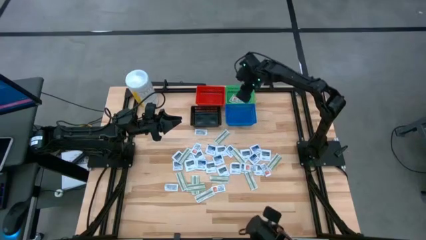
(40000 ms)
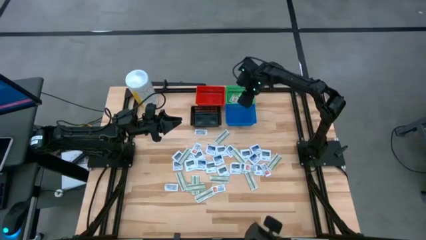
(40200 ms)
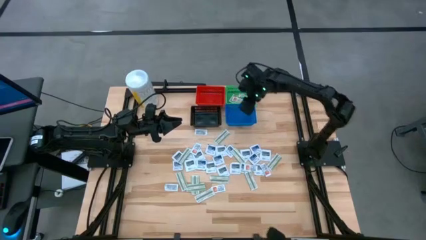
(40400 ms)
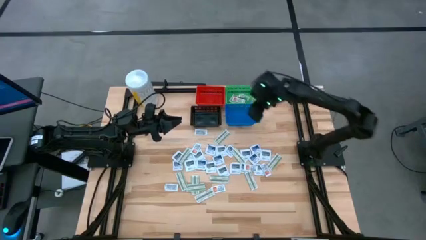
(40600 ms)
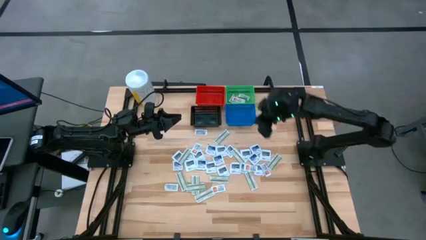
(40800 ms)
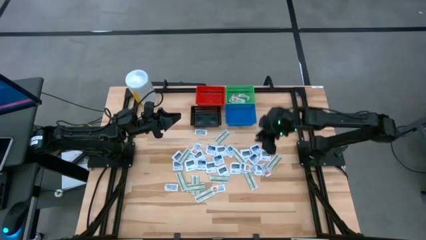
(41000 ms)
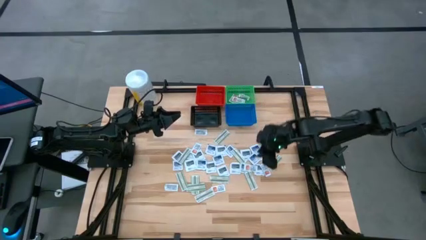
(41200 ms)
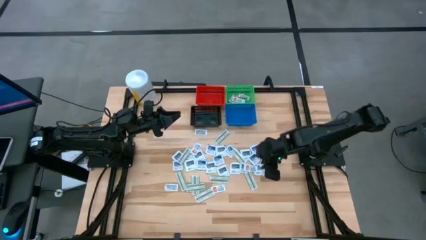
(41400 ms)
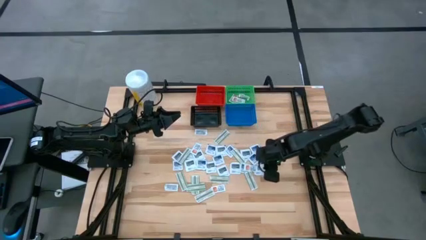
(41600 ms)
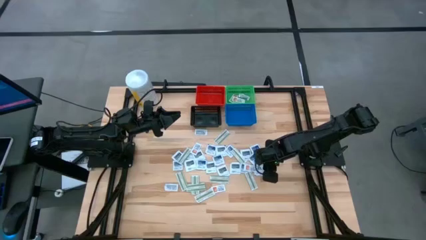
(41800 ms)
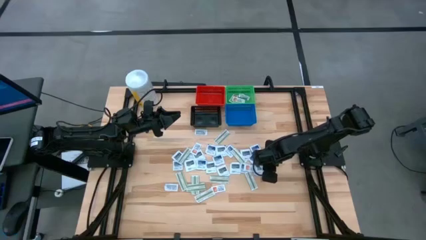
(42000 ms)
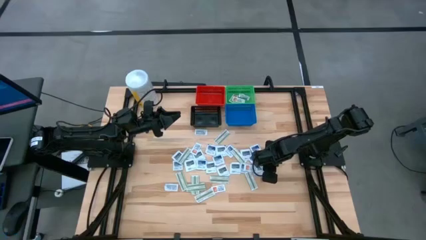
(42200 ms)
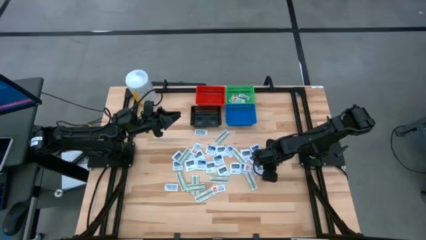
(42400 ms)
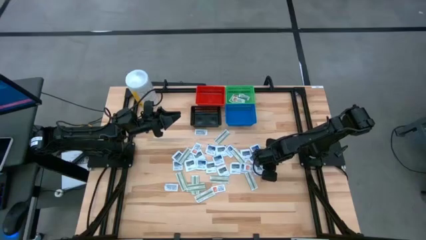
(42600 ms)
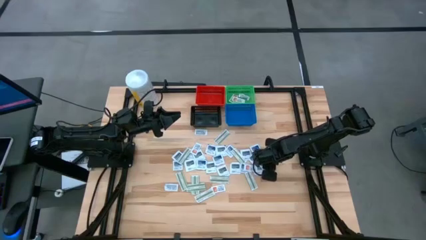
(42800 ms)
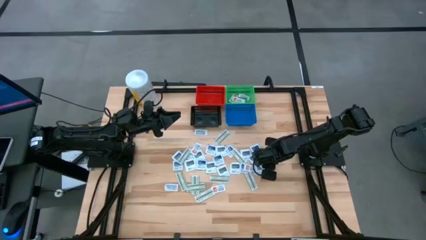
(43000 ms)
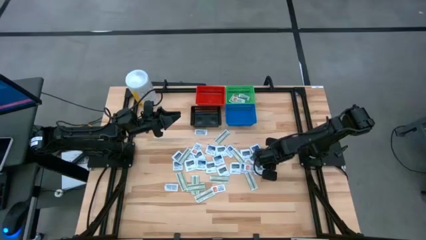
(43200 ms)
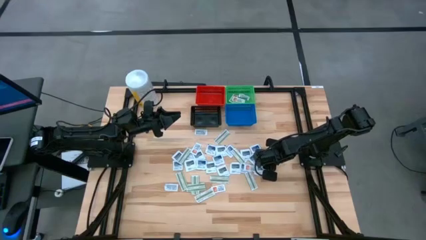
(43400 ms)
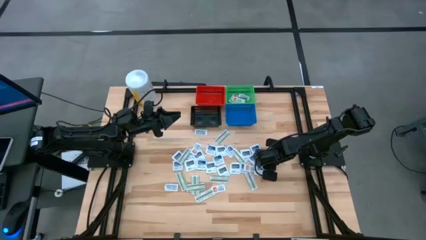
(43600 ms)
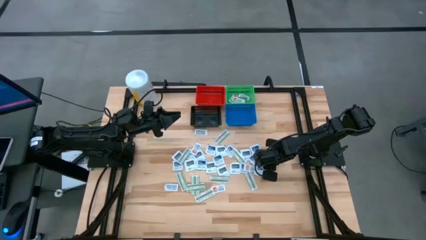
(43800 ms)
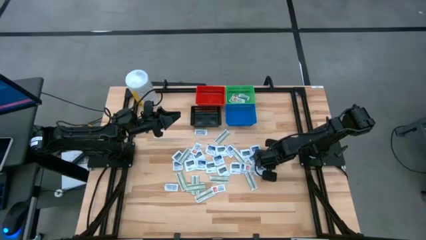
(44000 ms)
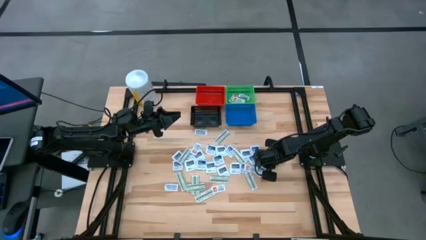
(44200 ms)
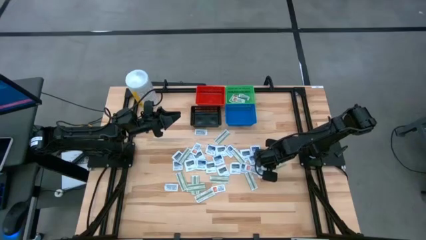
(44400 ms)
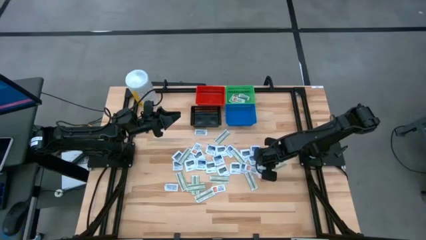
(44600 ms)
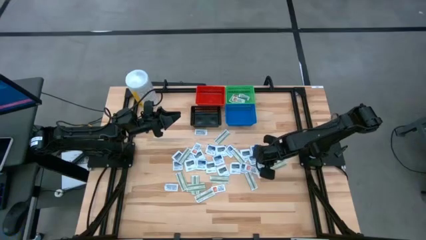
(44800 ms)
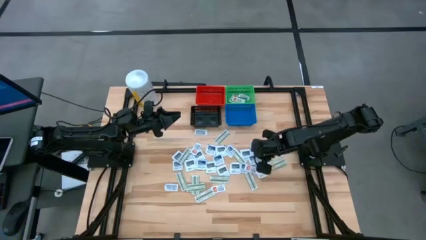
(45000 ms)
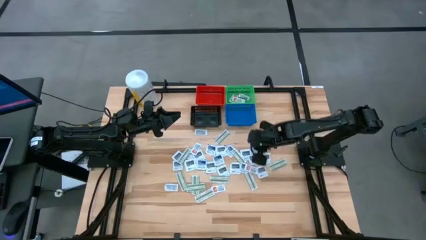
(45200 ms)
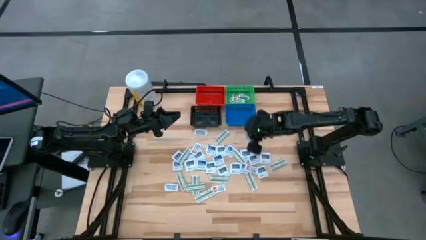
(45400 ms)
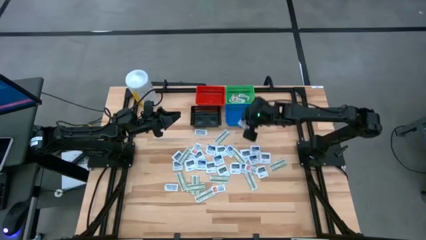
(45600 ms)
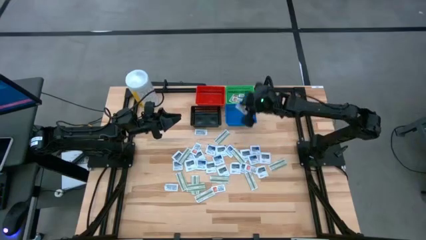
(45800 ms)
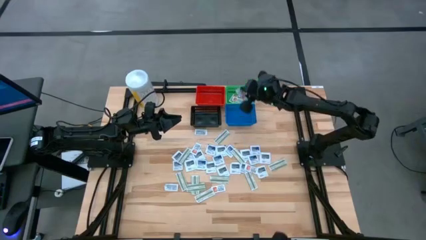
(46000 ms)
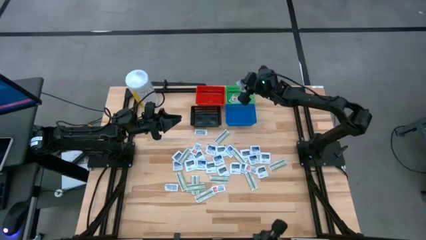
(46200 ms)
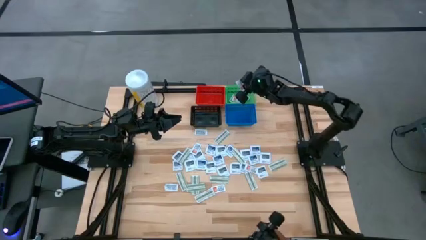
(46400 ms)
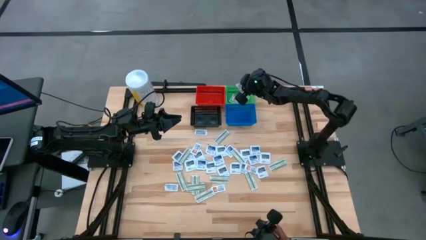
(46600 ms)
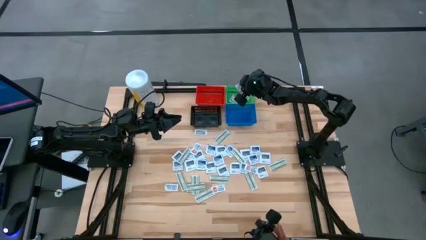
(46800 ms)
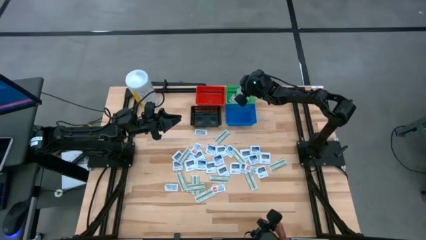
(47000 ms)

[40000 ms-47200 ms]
Task: Pick & Place First Aid Supplies
Put the ointment pack into the green basket

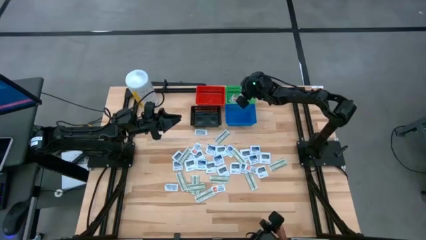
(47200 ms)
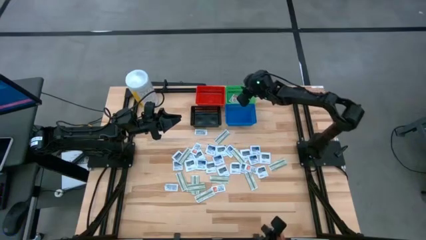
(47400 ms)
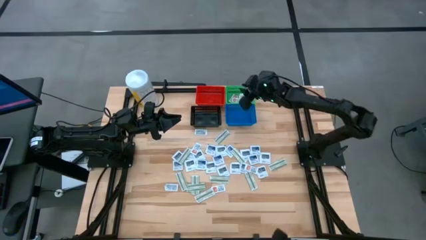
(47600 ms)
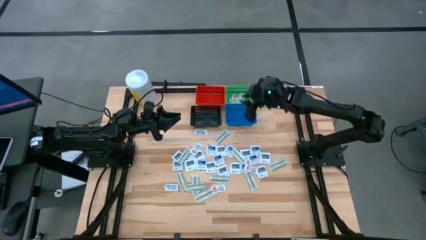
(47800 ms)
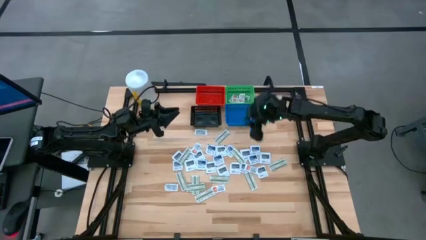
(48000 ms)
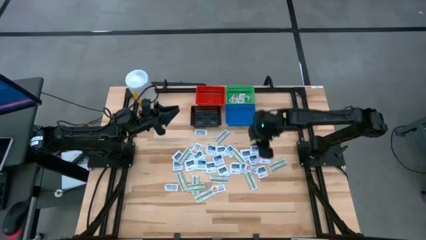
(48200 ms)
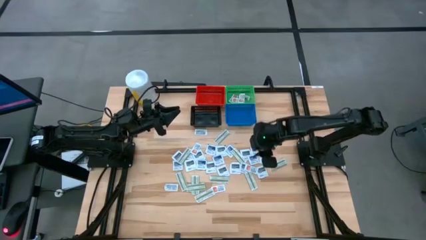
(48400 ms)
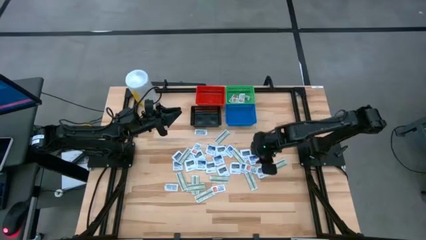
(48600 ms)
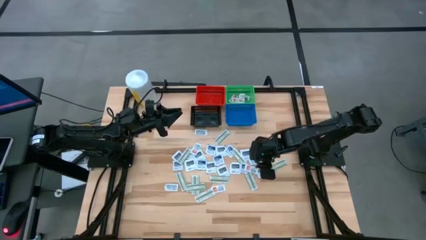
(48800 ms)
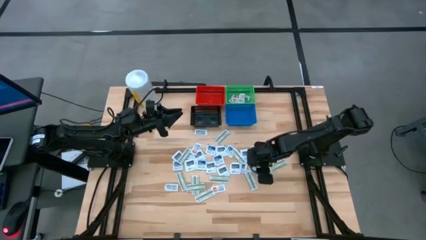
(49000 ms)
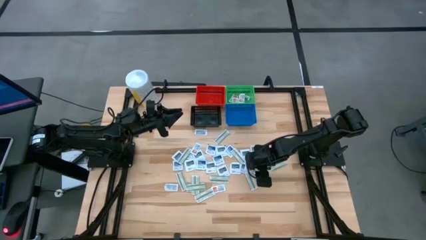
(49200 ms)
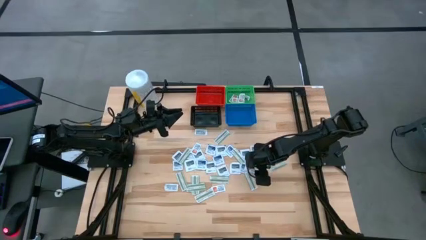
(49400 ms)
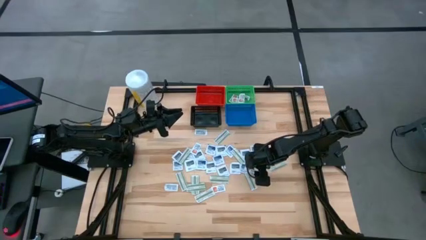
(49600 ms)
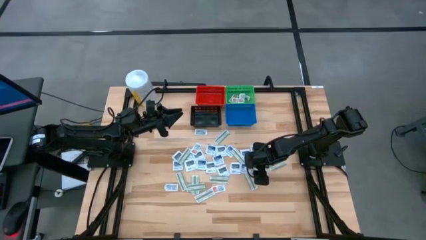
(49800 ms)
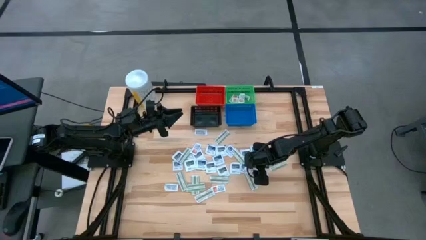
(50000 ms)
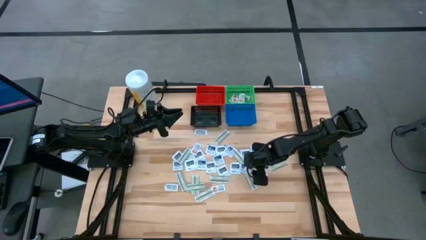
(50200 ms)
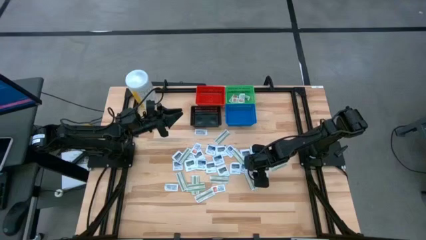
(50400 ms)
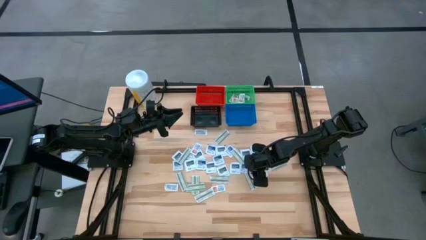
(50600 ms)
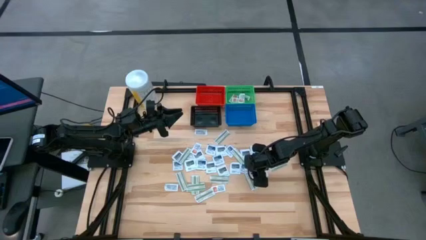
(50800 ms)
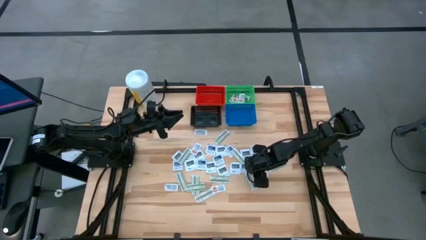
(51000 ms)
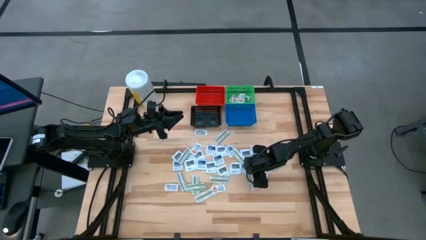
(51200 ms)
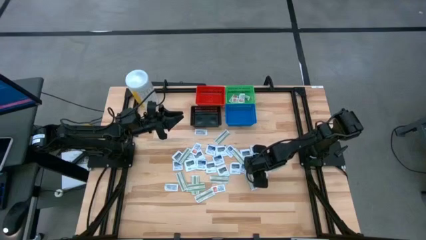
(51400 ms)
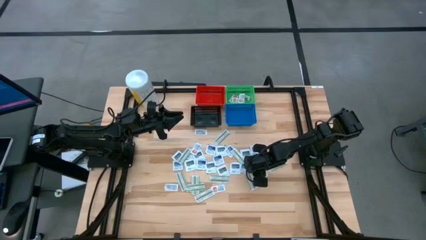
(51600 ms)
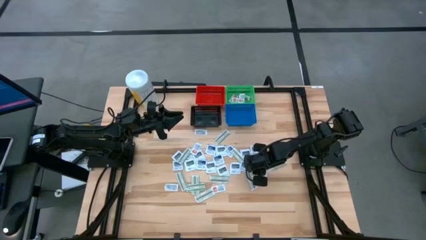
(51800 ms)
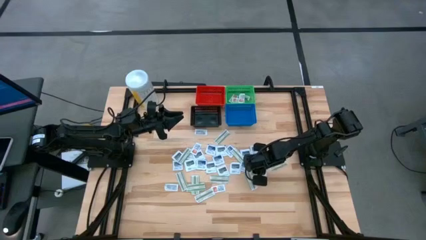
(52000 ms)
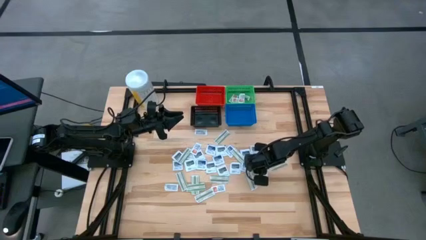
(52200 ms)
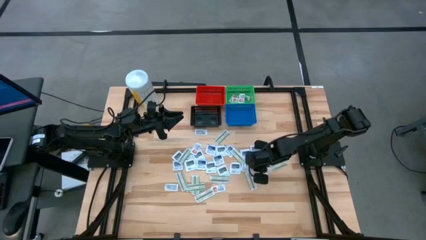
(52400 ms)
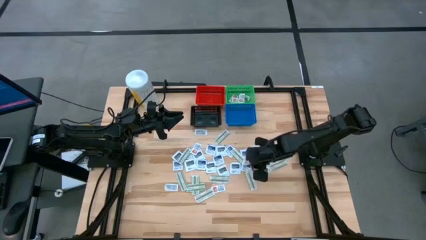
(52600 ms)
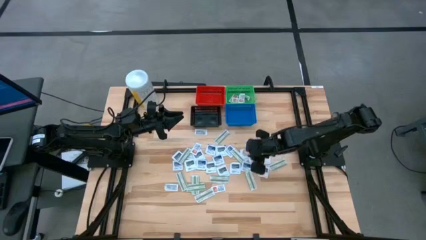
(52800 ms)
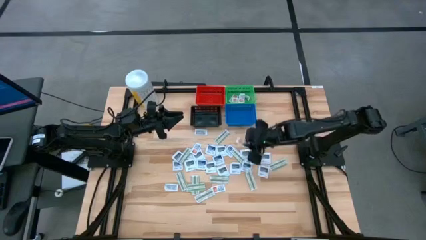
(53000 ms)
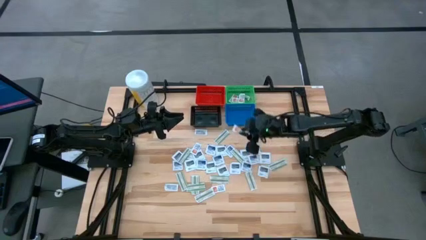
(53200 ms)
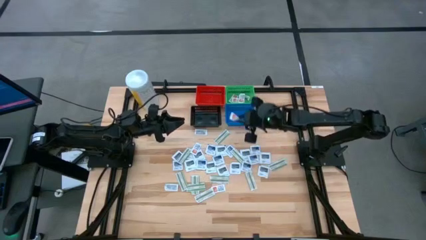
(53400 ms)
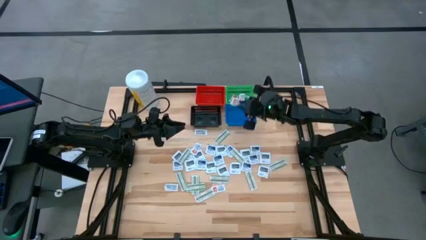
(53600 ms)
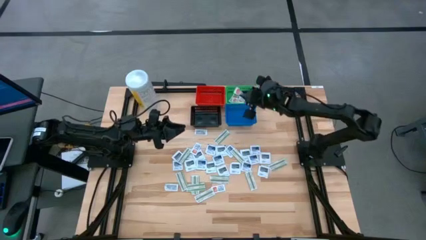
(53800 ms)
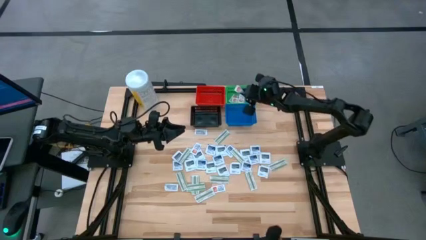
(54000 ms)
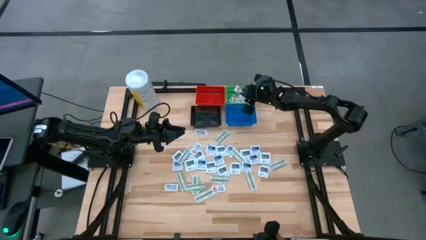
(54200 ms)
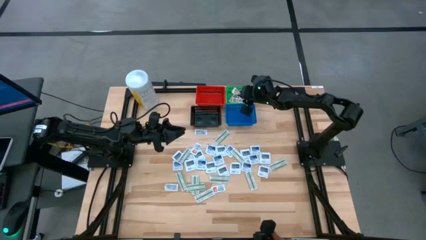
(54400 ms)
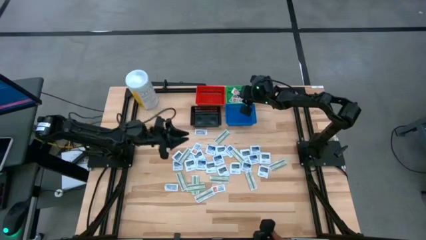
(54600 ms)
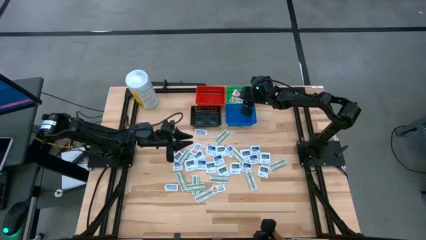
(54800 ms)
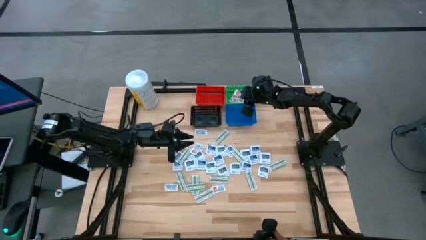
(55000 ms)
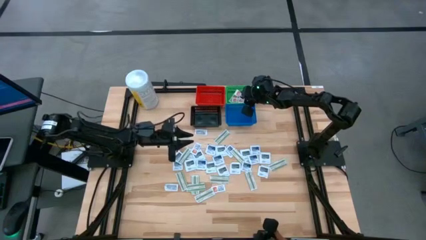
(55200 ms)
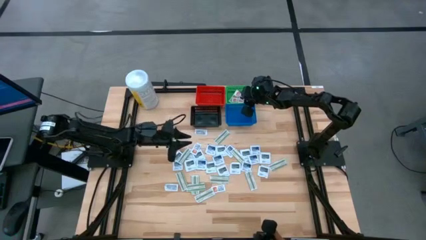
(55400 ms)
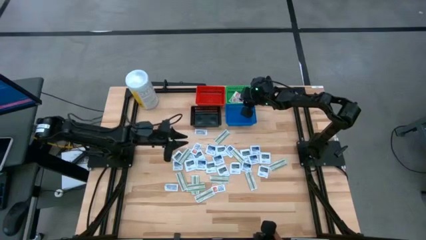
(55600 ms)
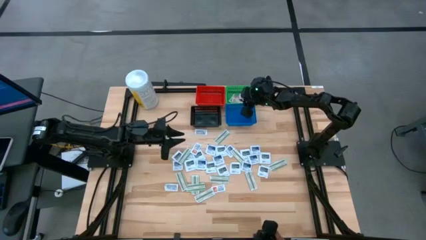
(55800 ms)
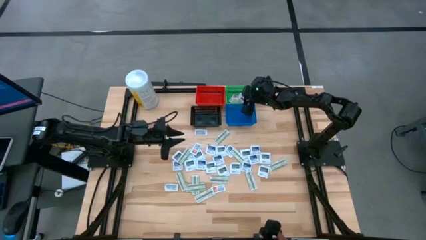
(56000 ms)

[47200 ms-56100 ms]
Put the ointment pack into the green basket
